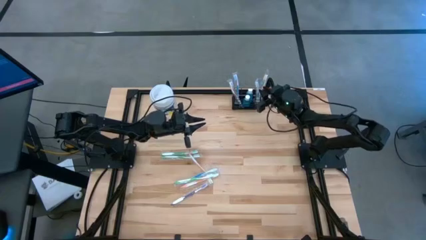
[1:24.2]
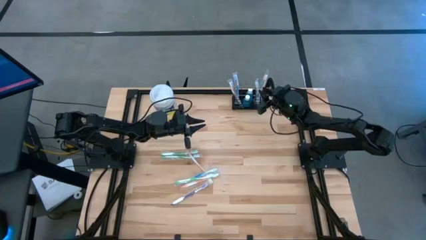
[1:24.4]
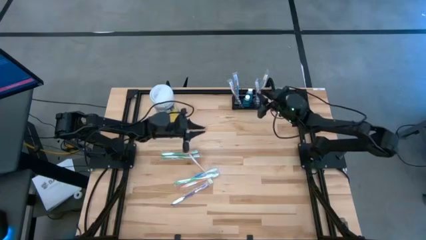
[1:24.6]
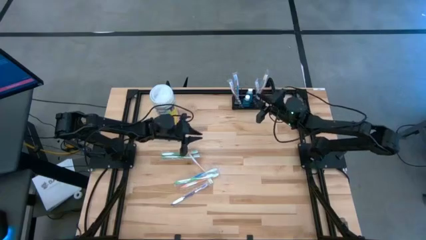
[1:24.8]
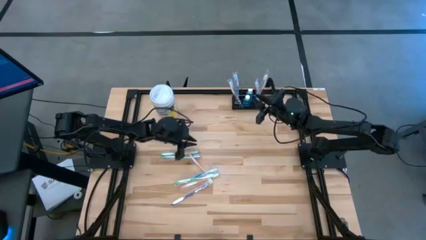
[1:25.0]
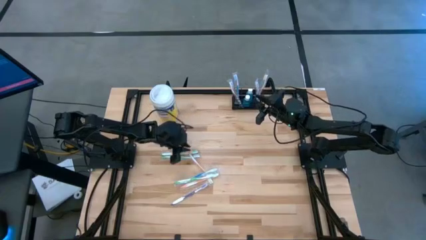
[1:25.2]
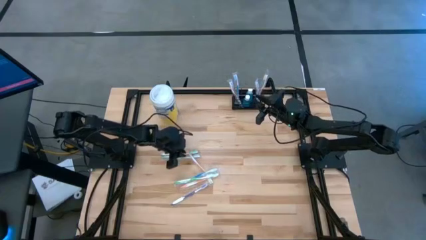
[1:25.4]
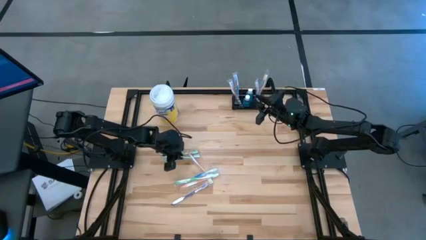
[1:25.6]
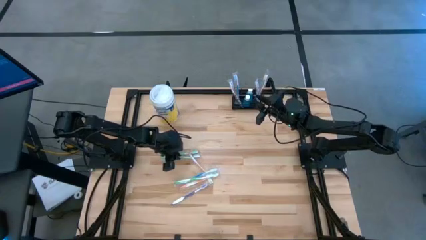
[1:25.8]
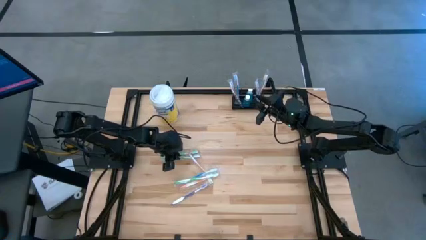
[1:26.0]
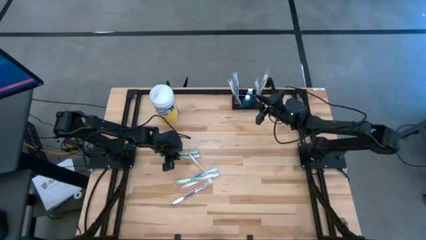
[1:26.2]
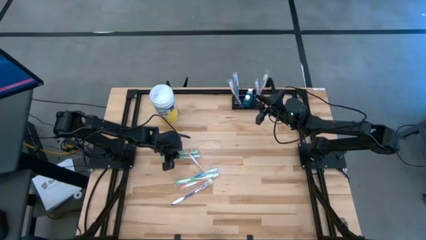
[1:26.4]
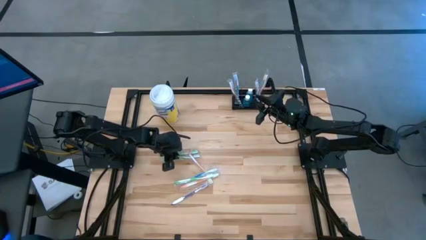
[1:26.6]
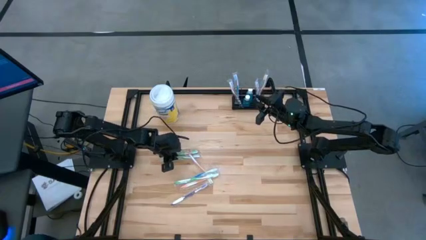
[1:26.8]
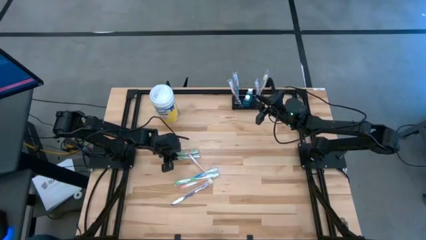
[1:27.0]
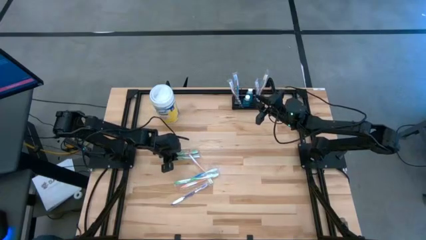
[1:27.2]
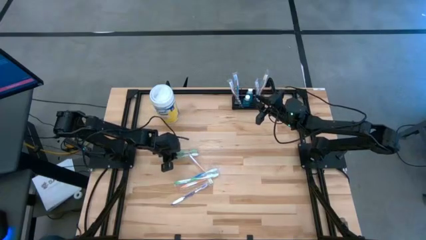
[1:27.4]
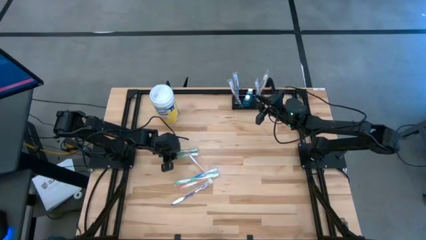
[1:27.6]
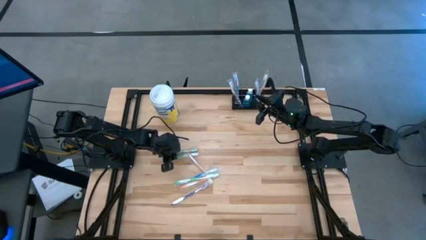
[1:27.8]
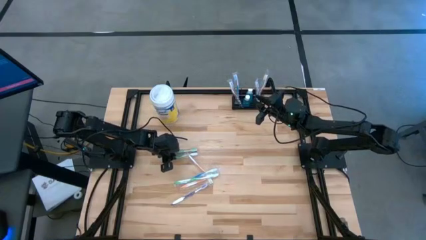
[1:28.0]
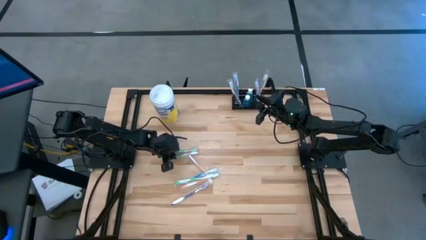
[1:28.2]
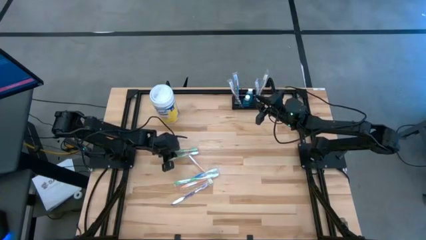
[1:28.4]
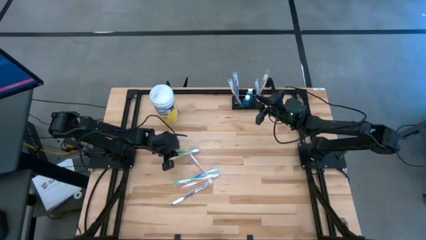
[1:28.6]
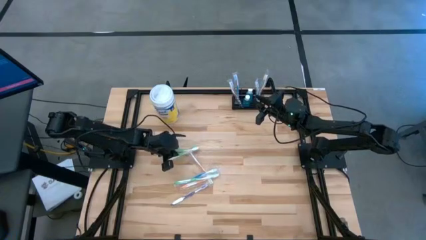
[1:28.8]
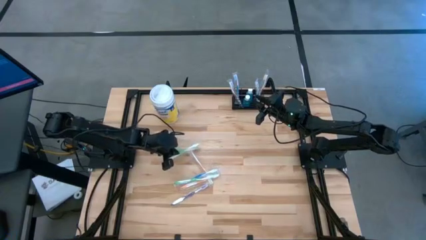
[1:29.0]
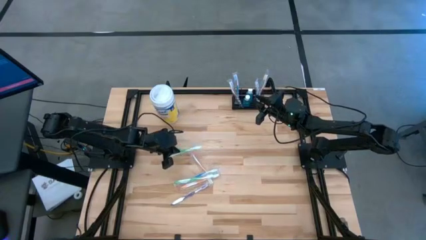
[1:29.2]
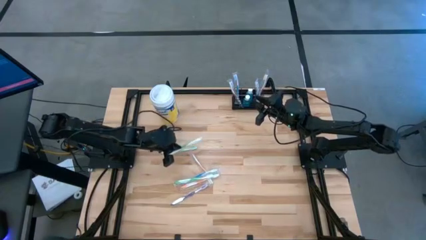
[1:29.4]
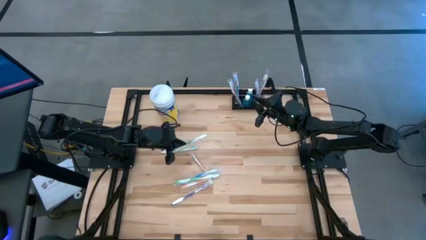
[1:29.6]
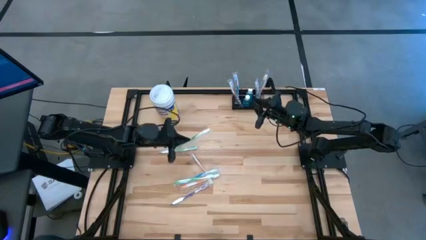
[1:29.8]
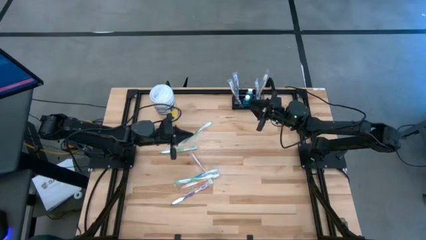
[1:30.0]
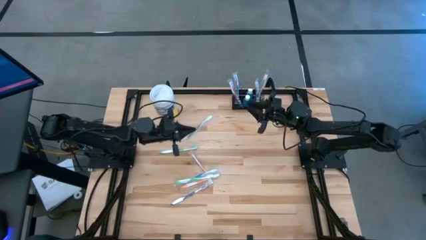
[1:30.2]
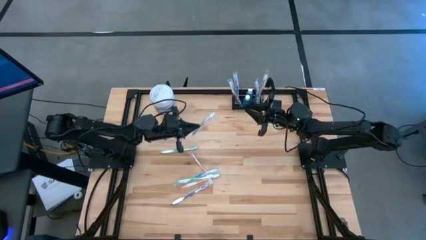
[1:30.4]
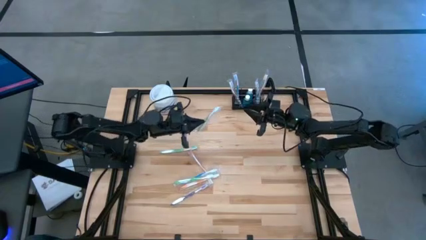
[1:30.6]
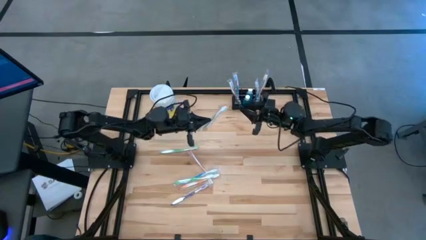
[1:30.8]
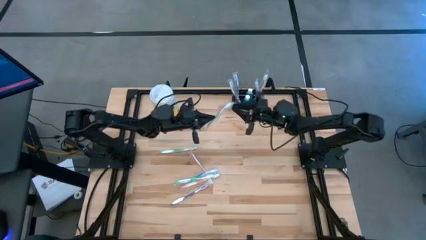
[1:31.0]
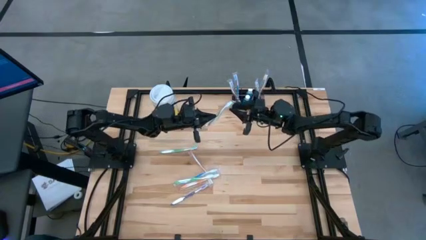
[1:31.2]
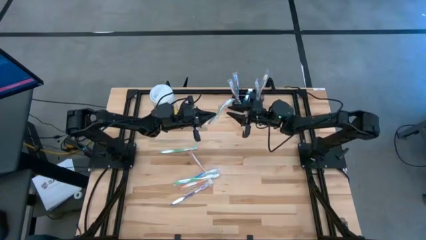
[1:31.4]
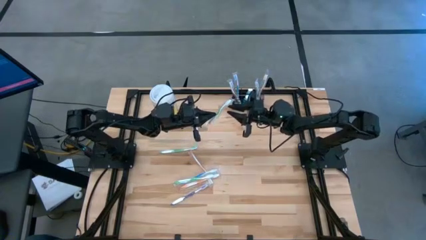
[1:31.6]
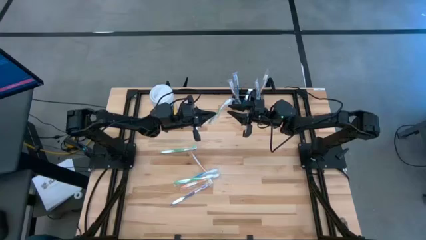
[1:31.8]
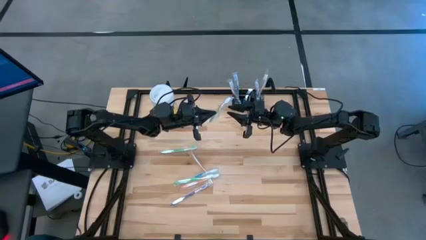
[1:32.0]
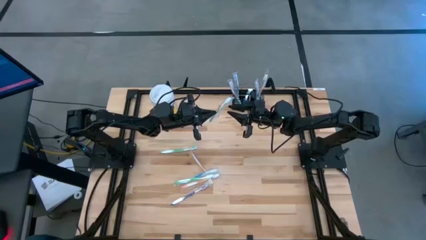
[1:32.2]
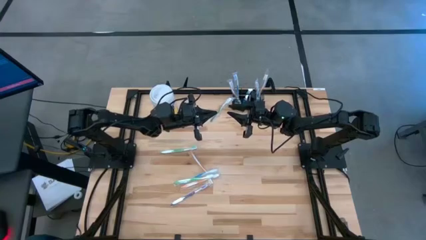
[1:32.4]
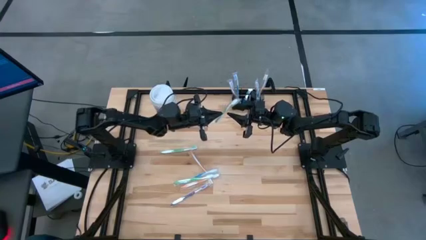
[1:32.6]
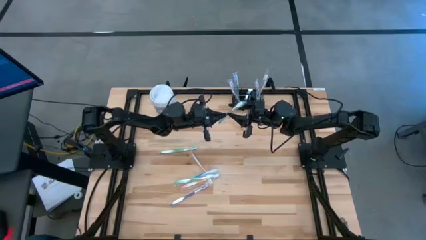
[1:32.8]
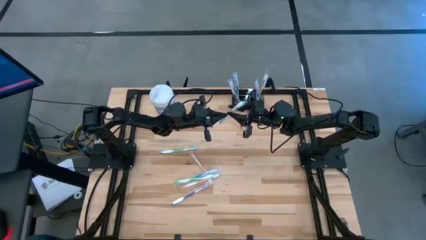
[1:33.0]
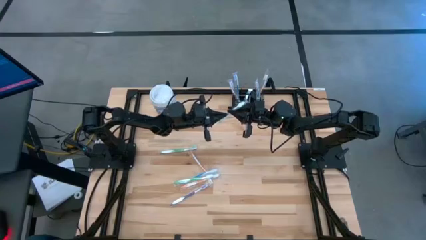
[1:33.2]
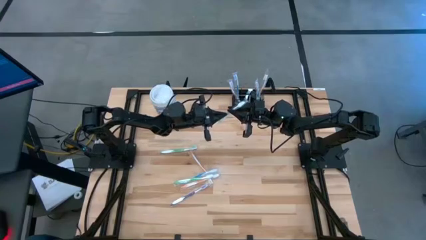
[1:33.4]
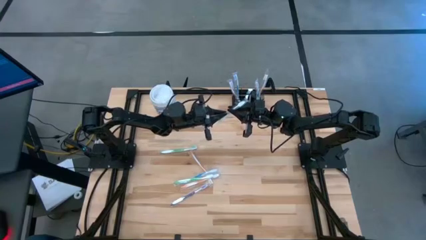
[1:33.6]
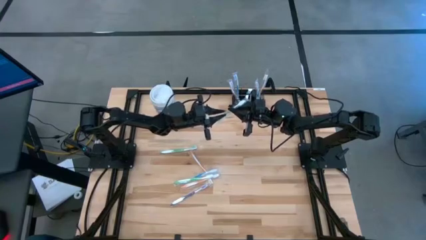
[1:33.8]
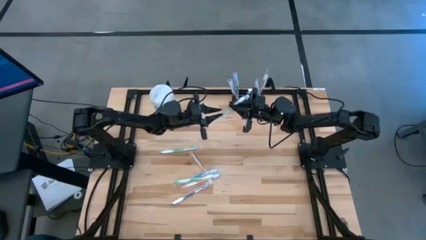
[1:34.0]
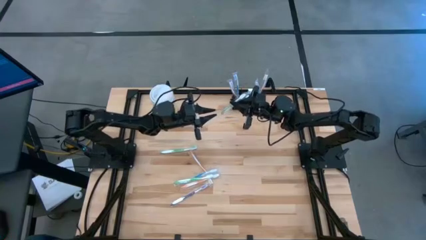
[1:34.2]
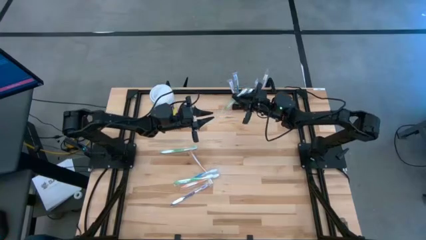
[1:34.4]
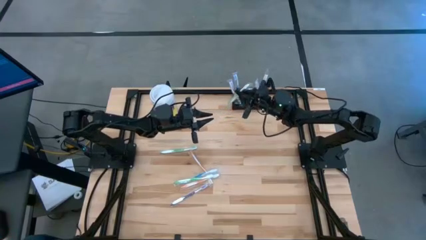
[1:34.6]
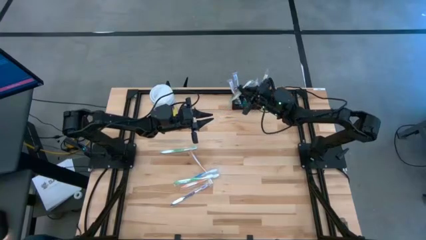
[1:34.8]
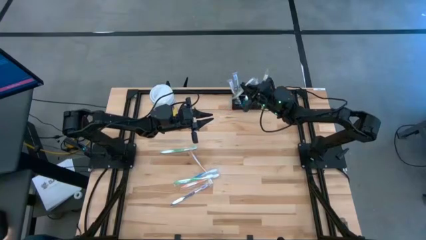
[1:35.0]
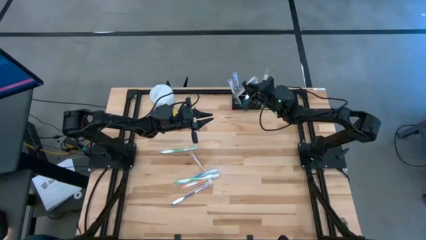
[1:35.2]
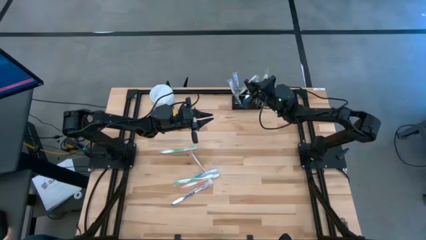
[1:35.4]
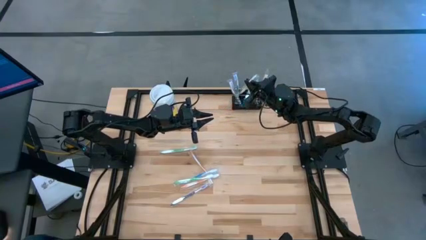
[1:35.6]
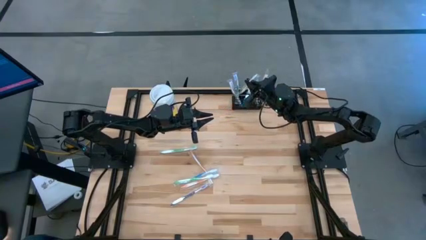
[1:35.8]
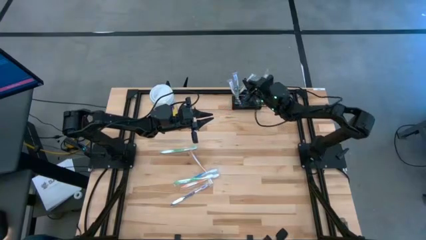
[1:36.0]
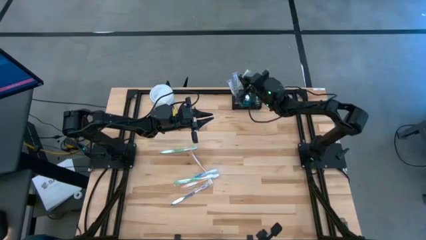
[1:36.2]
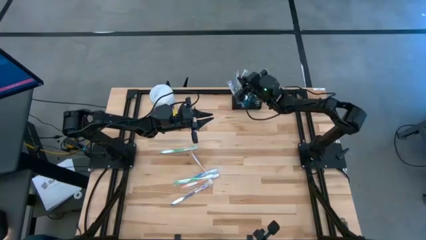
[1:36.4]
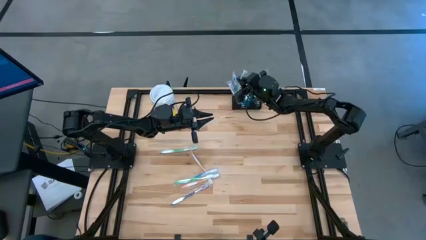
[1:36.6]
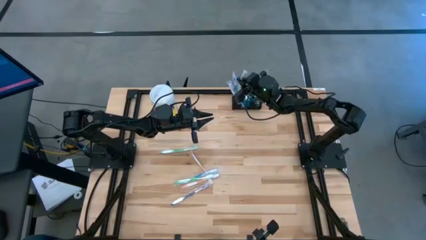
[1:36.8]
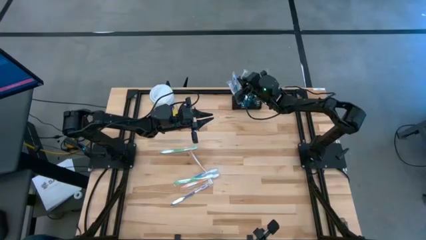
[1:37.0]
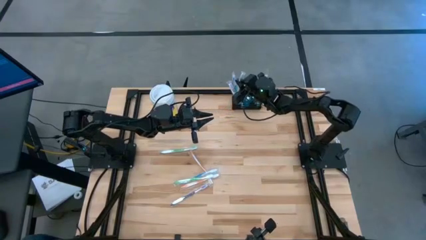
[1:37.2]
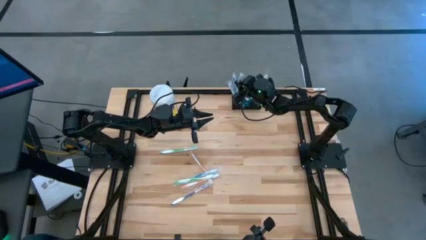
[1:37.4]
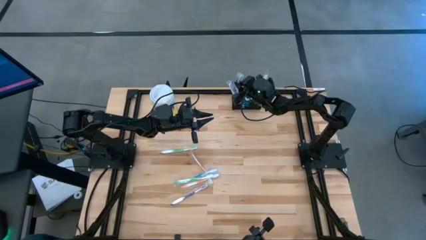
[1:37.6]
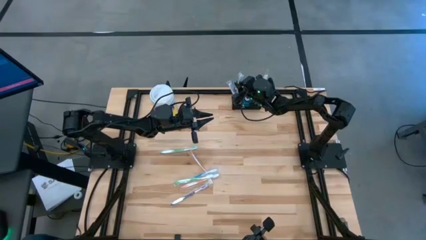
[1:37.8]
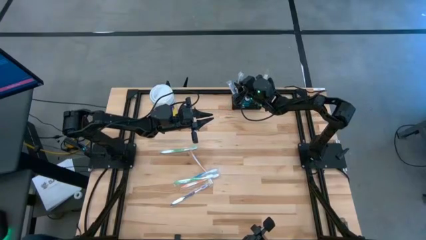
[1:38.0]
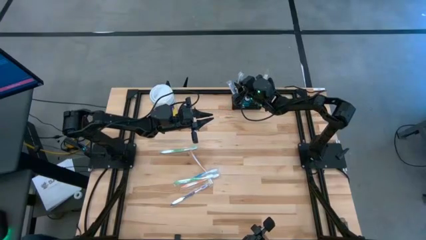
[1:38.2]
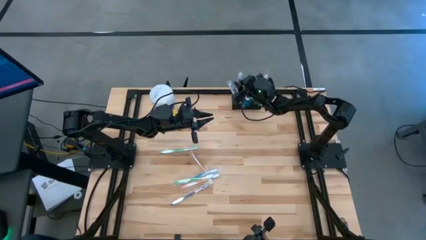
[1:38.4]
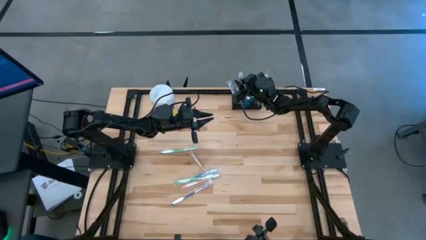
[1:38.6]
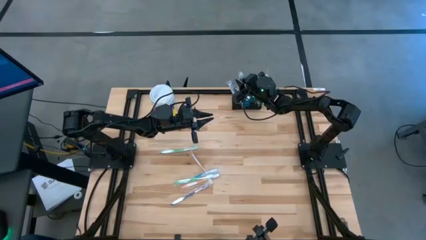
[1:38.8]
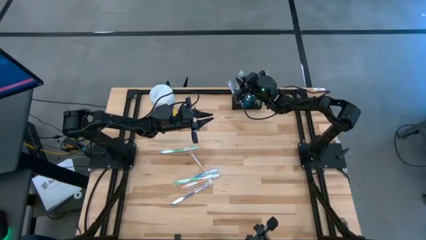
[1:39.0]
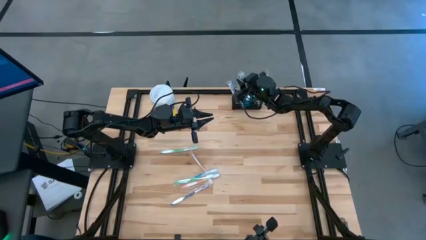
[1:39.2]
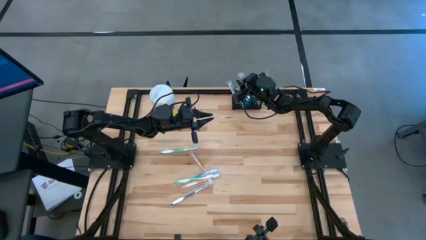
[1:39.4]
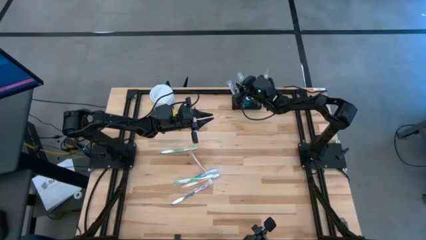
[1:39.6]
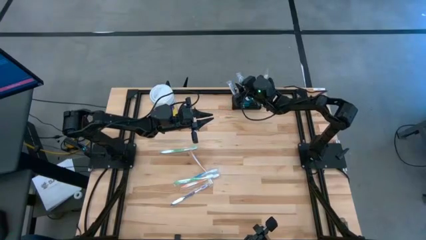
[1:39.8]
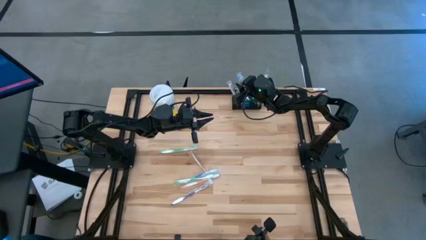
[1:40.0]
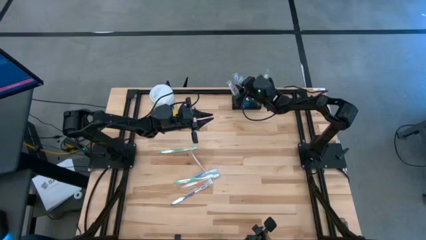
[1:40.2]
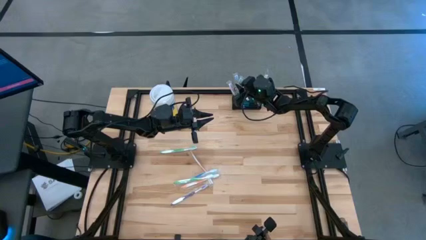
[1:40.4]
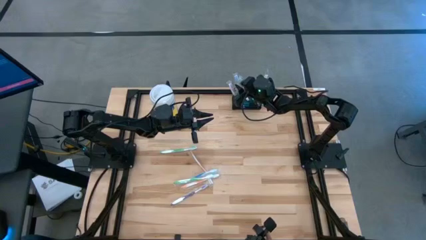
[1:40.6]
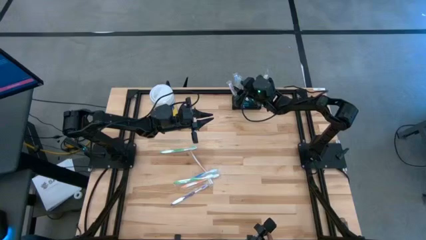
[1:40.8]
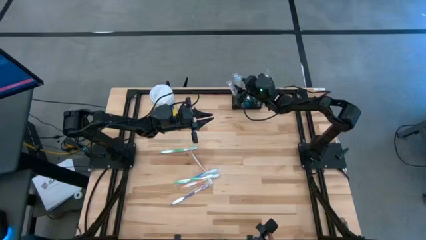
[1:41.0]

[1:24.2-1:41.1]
Task: Pick & Place toothbrushing station
Put the green toothbrush into the black mesh organizer
